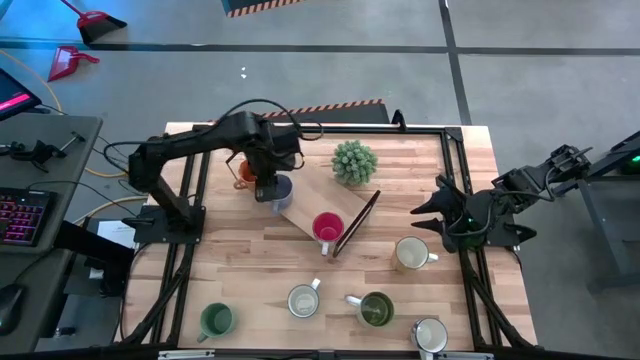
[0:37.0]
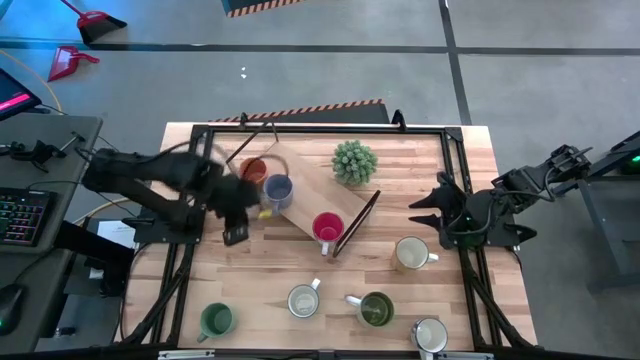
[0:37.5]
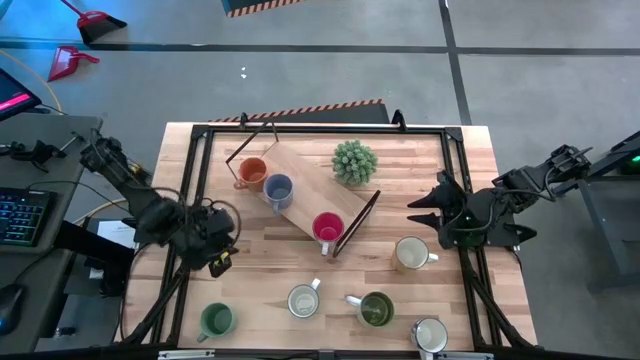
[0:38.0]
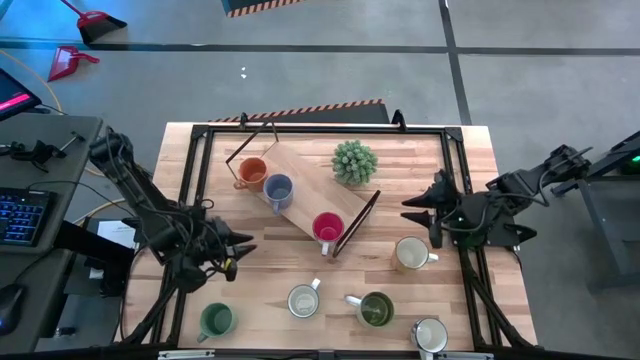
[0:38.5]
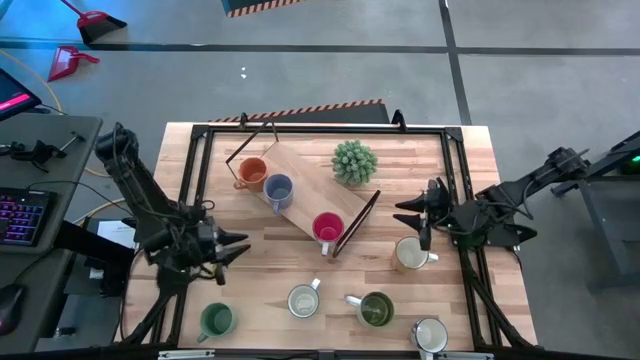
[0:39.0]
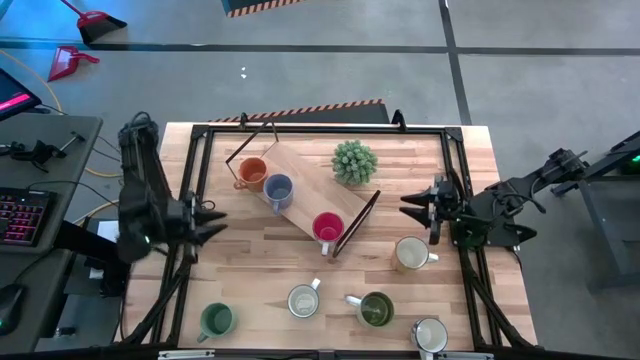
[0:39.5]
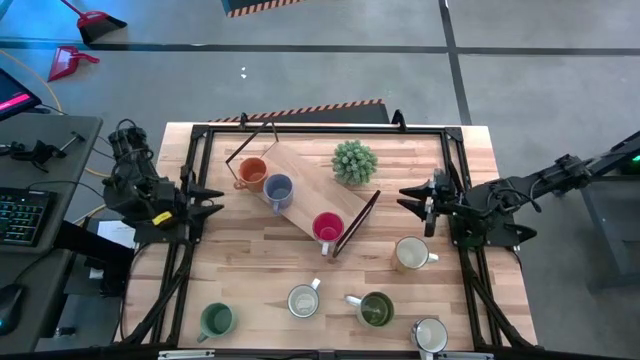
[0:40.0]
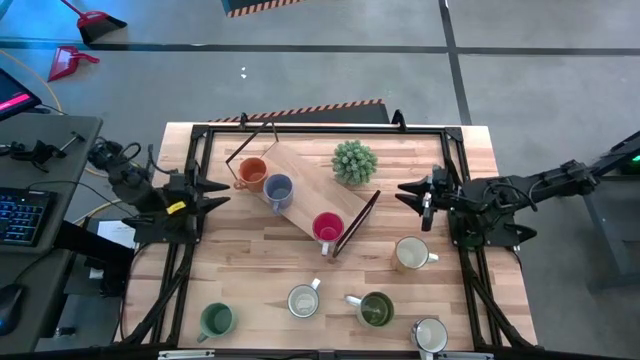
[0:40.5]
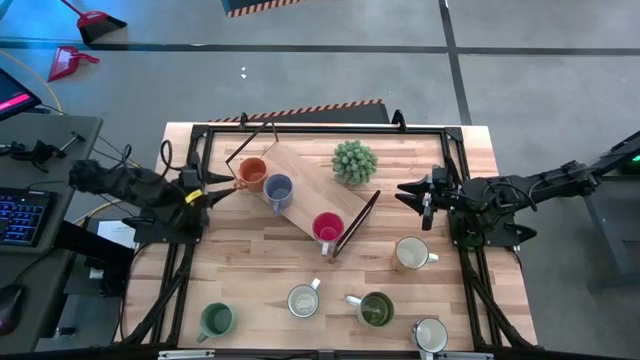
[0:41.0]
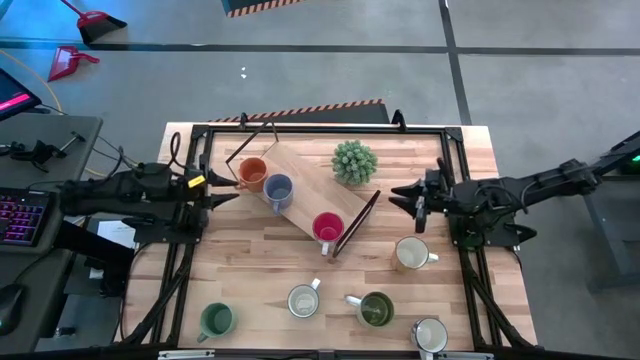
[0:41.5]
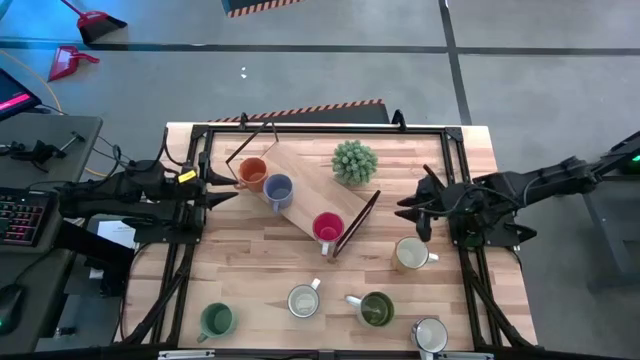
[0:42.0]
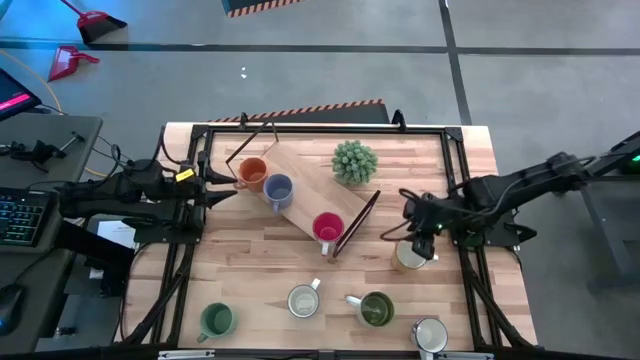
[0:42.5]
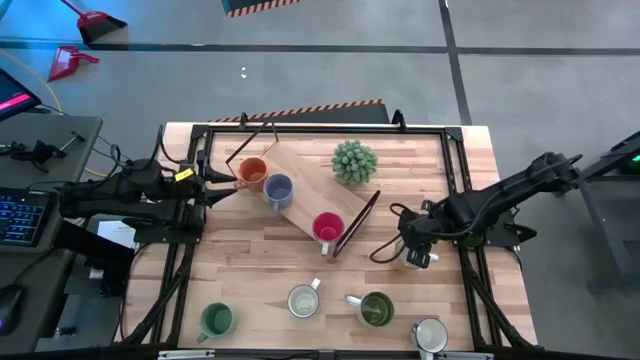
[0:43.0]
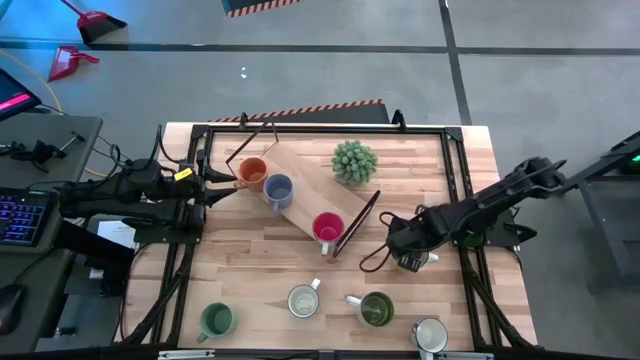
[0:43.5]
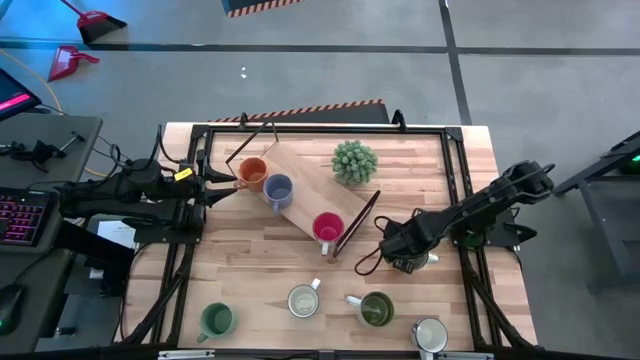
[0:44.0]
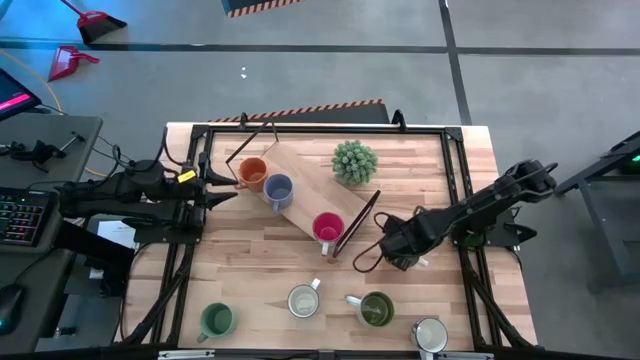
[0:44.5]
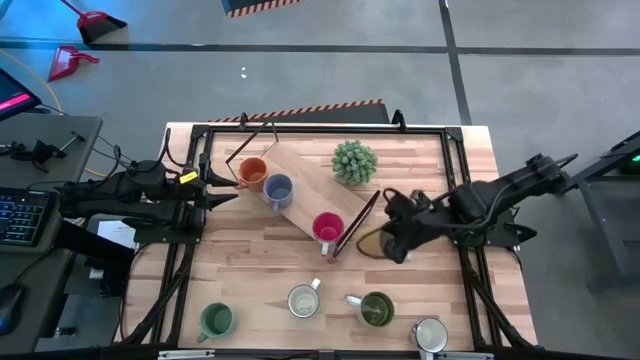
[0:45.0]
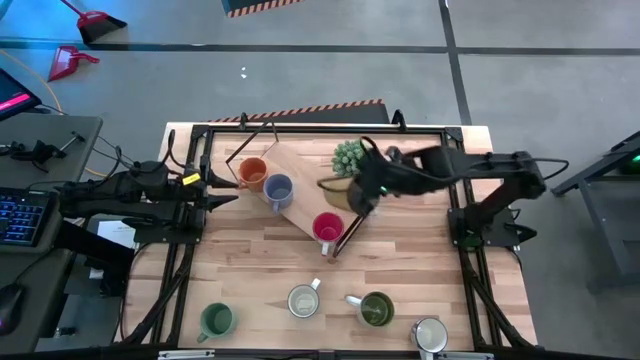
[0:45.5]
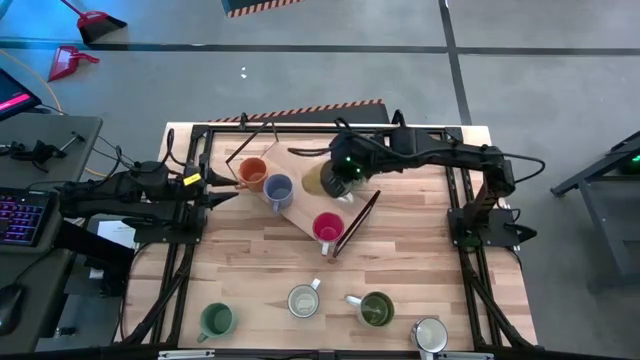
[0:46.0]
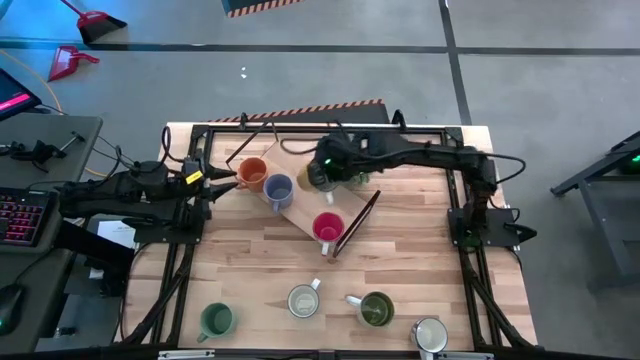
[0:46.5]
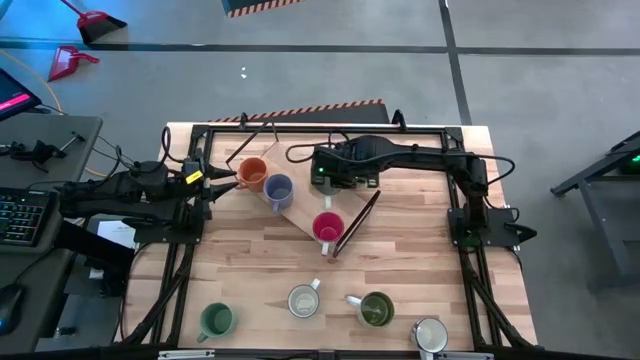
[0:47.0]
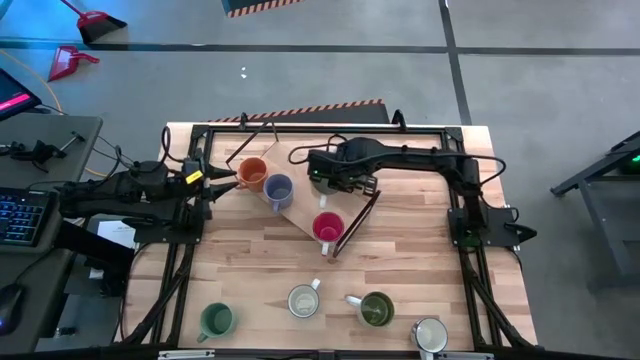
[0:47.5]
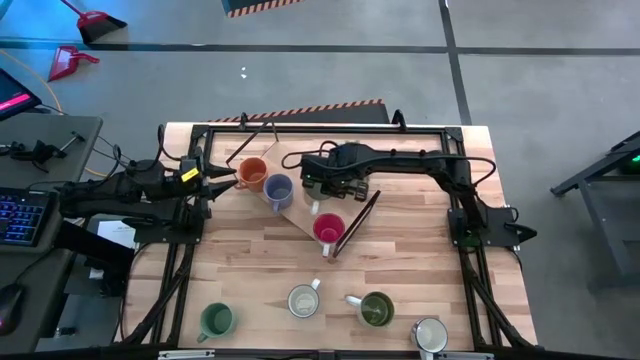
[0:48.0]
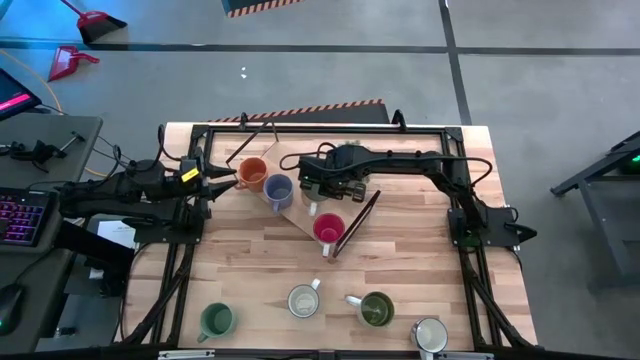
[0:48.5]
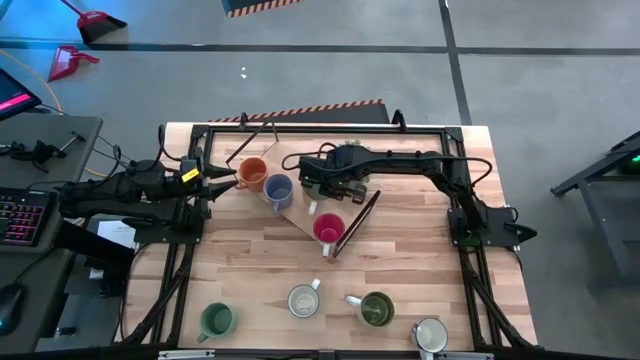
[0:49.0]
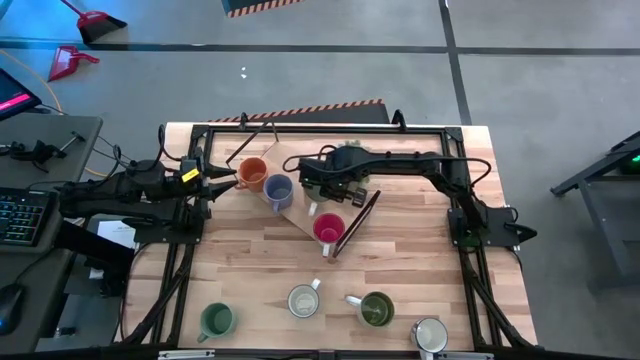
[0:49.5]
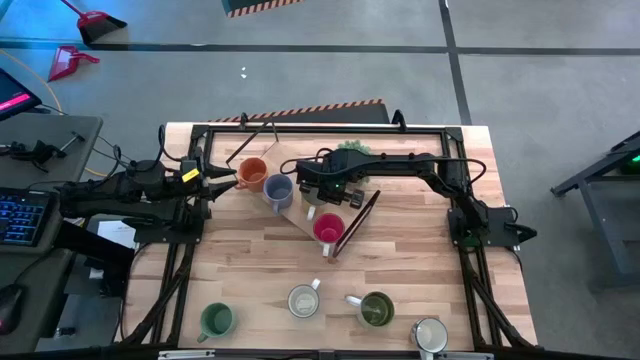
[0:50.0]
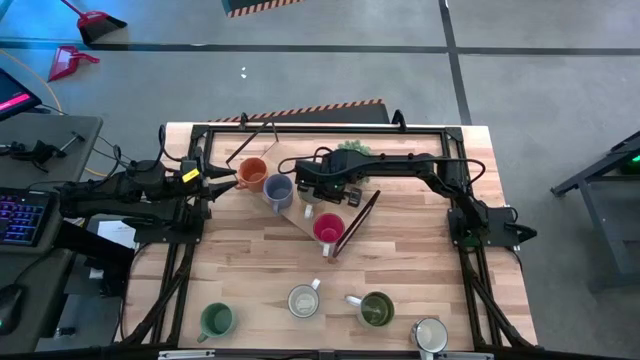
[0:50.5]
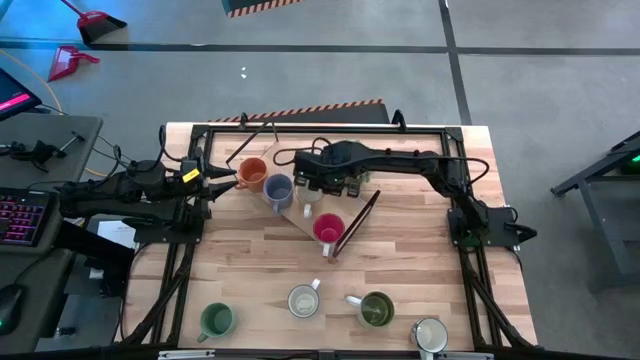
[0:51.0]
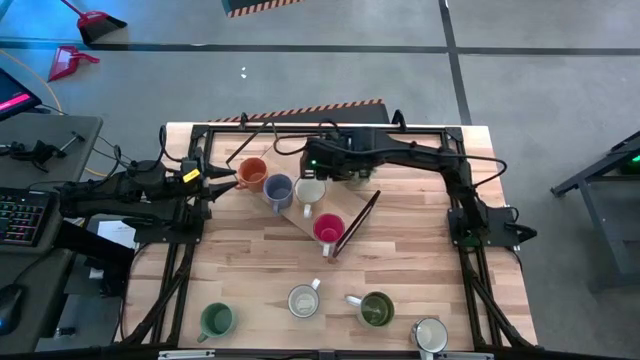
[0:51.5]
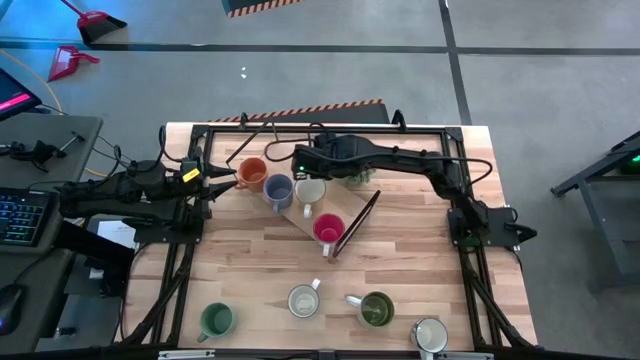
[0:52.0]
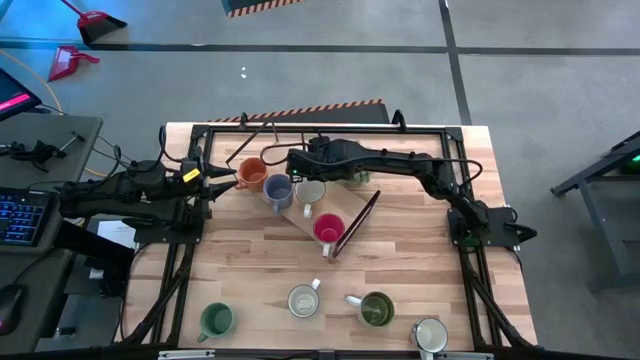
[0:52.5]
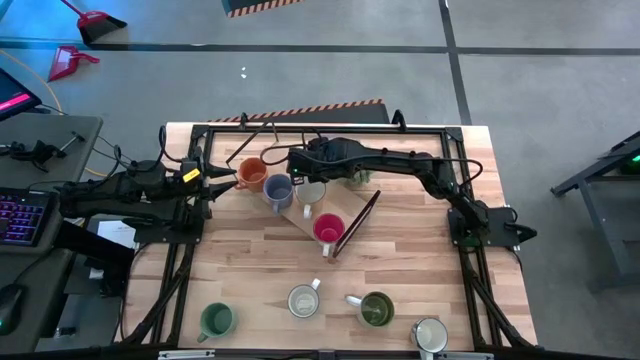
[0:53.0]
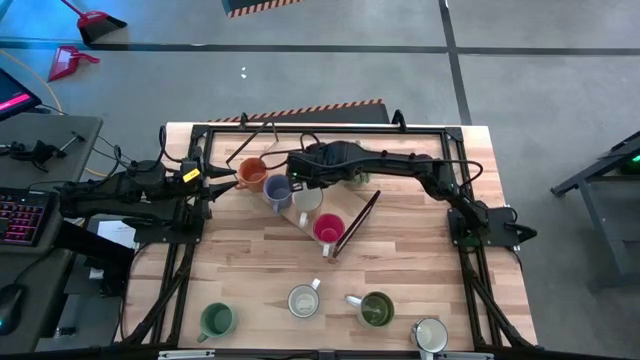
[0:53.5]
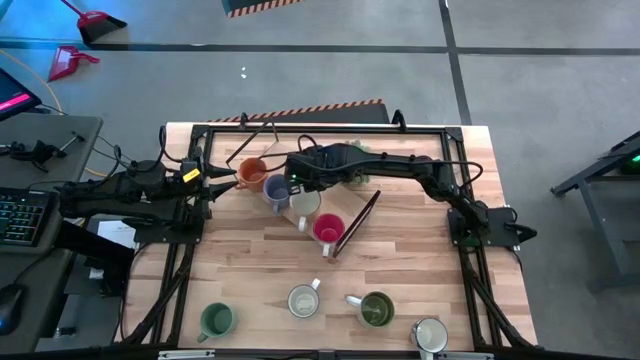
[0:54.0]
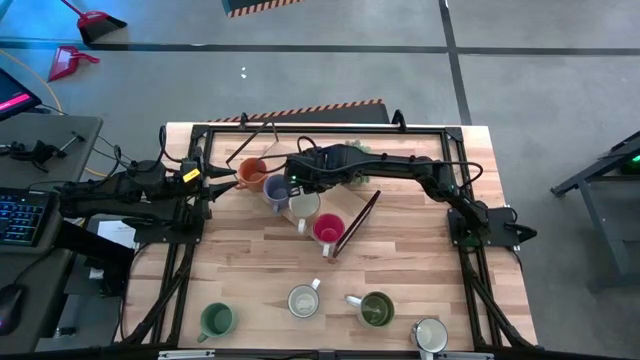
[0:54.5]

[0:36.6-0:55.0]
Task: Place coffee mugs
Put the yellow mug on the shelf
